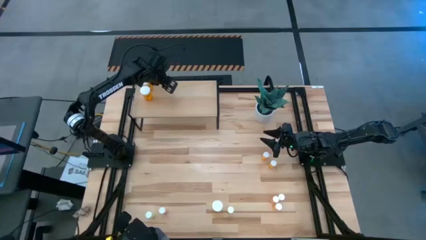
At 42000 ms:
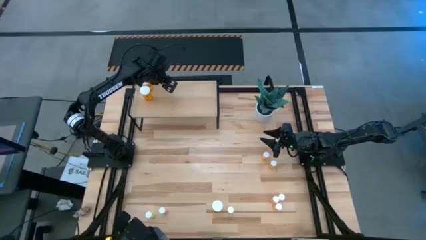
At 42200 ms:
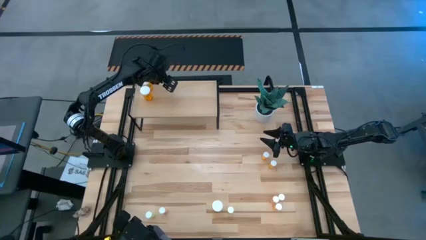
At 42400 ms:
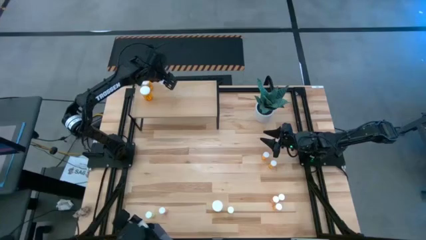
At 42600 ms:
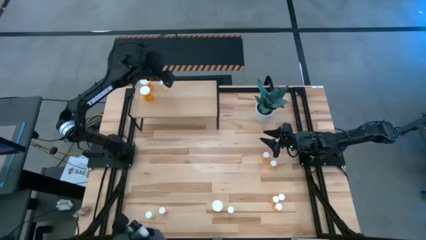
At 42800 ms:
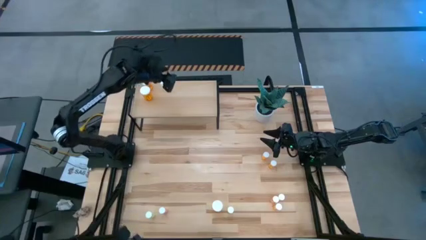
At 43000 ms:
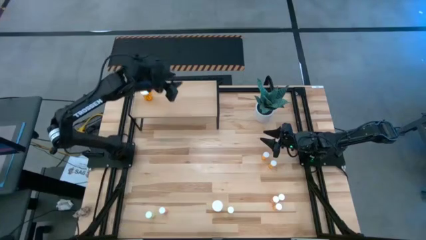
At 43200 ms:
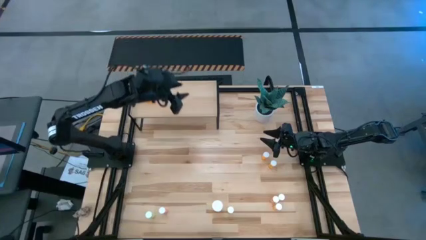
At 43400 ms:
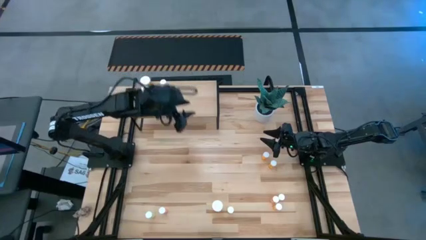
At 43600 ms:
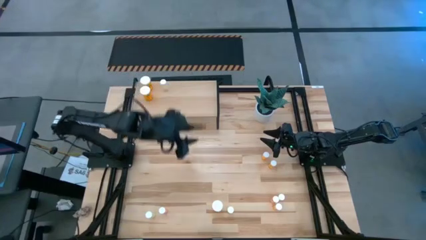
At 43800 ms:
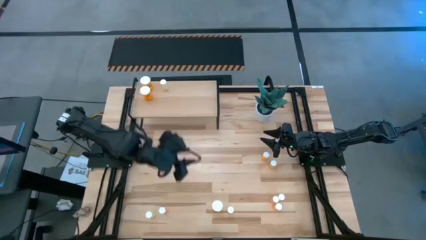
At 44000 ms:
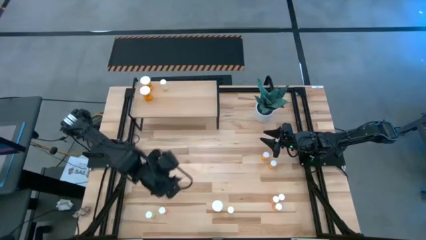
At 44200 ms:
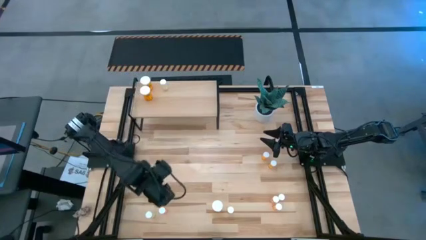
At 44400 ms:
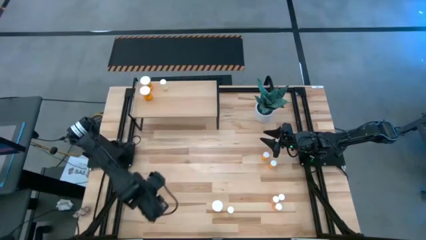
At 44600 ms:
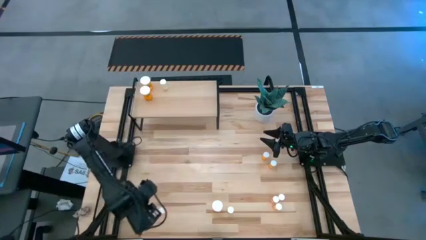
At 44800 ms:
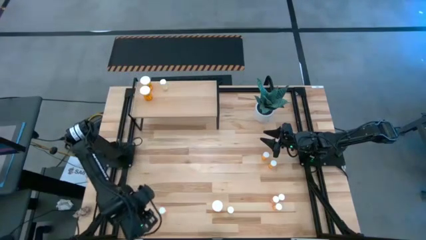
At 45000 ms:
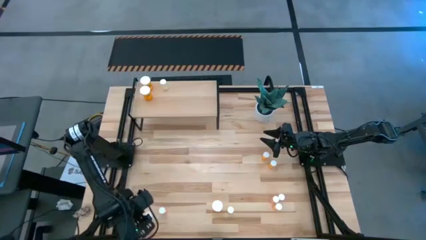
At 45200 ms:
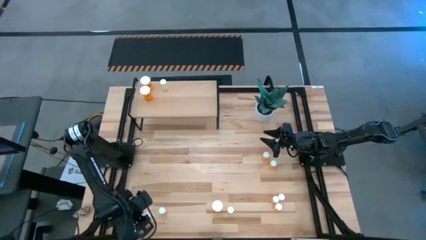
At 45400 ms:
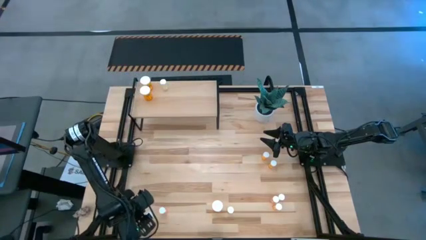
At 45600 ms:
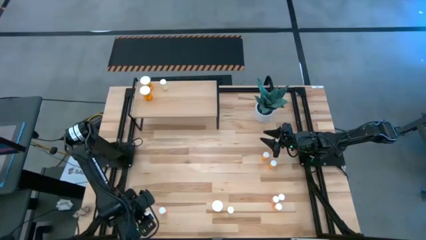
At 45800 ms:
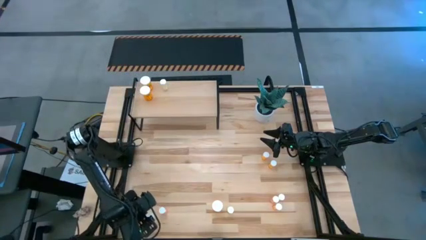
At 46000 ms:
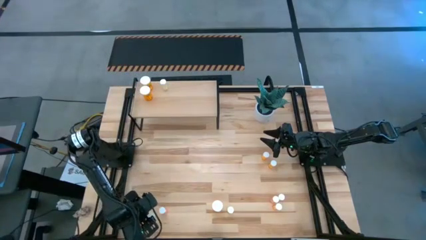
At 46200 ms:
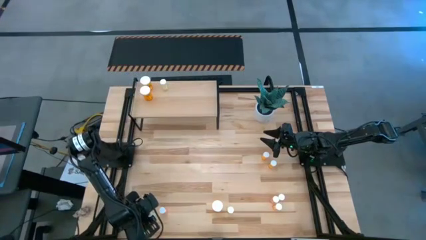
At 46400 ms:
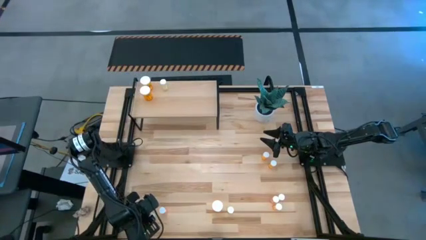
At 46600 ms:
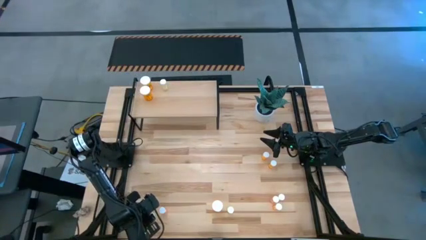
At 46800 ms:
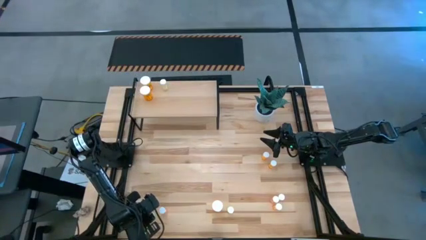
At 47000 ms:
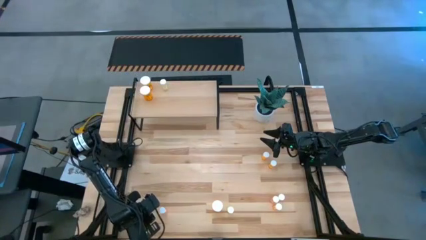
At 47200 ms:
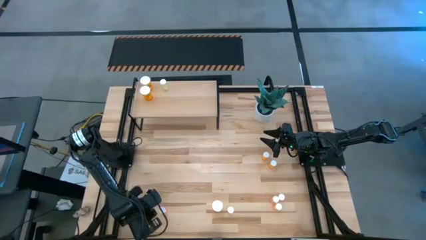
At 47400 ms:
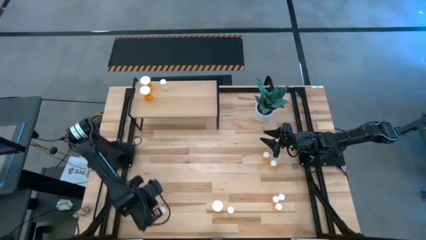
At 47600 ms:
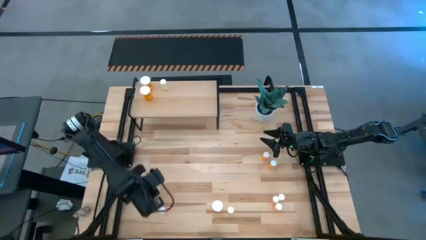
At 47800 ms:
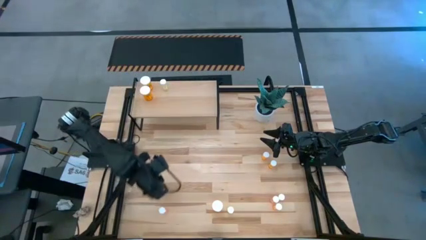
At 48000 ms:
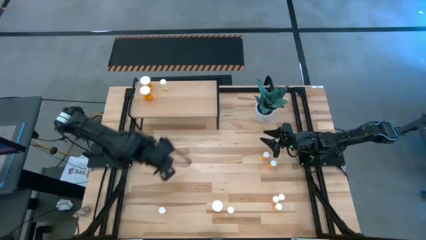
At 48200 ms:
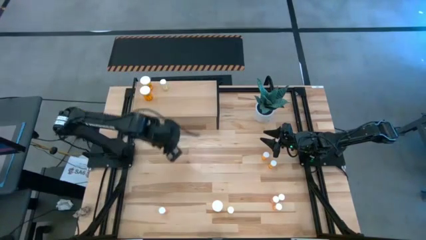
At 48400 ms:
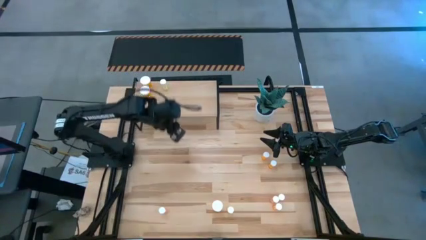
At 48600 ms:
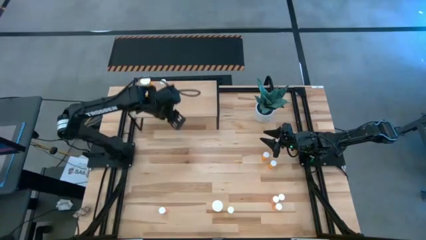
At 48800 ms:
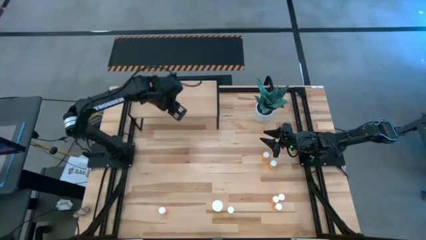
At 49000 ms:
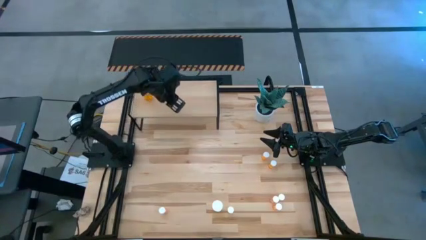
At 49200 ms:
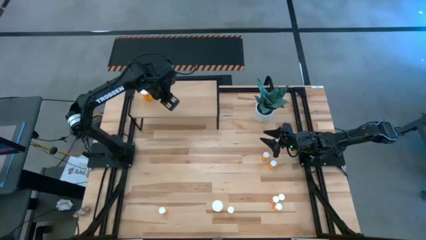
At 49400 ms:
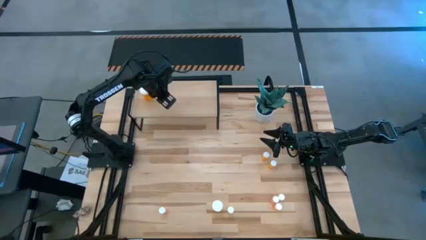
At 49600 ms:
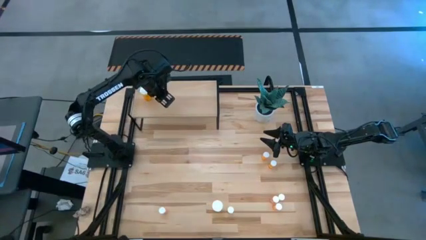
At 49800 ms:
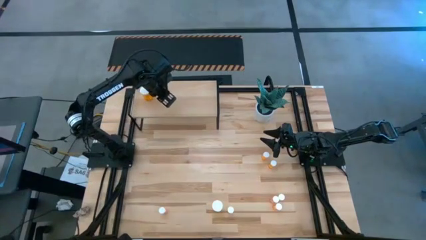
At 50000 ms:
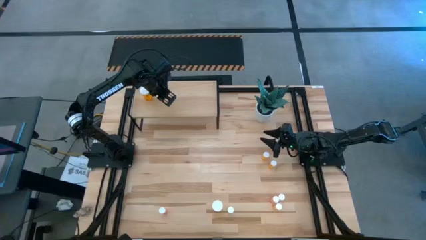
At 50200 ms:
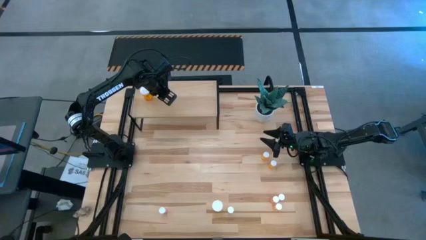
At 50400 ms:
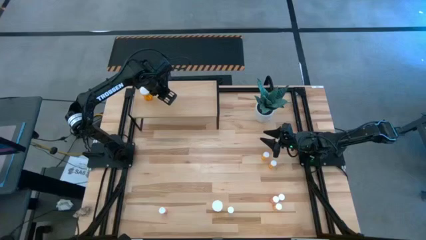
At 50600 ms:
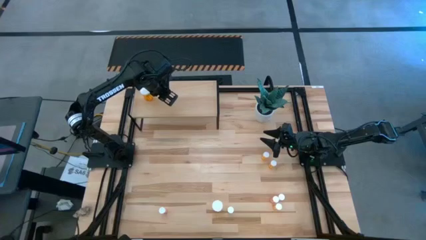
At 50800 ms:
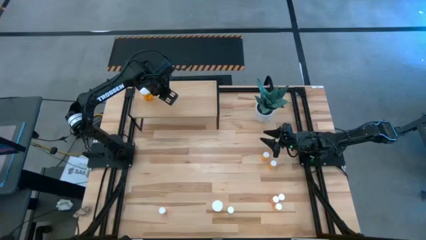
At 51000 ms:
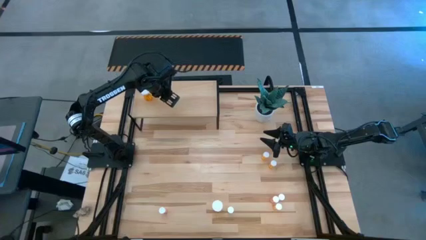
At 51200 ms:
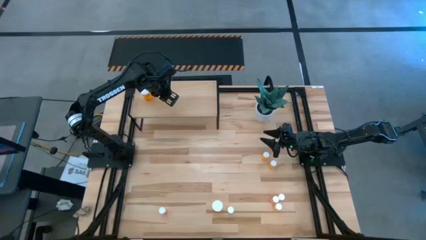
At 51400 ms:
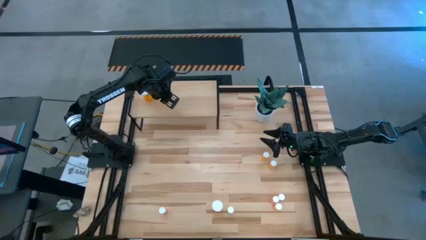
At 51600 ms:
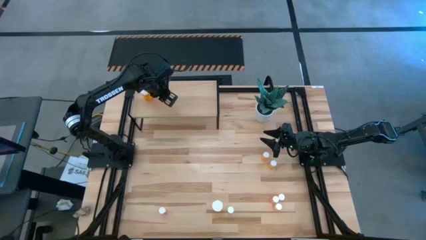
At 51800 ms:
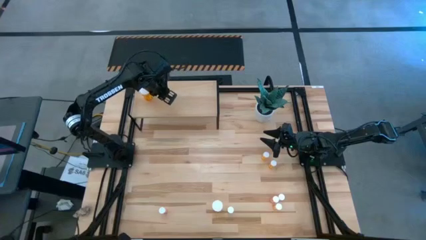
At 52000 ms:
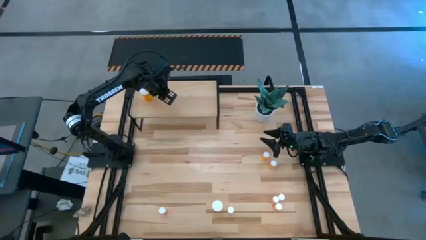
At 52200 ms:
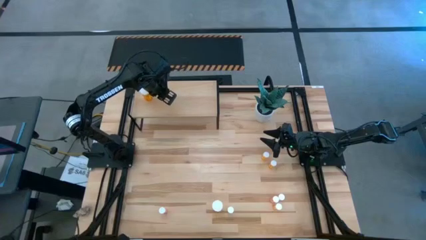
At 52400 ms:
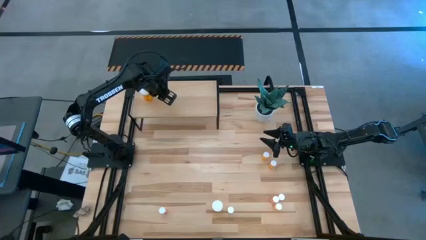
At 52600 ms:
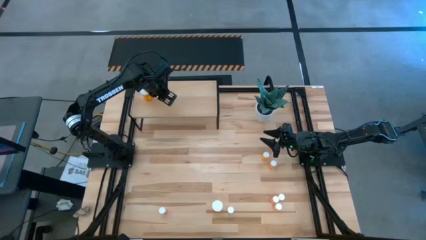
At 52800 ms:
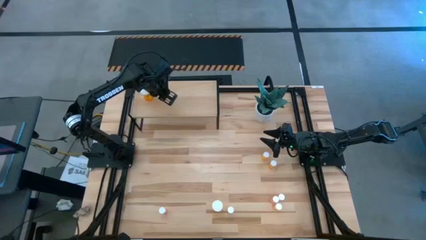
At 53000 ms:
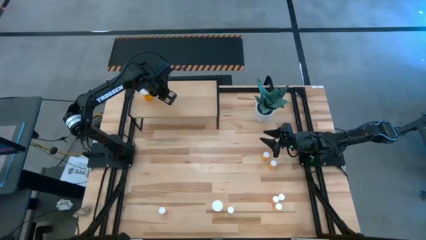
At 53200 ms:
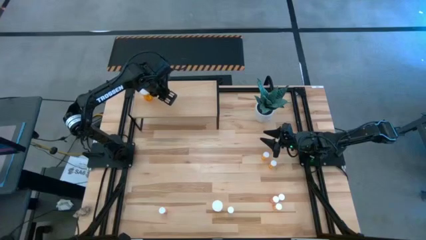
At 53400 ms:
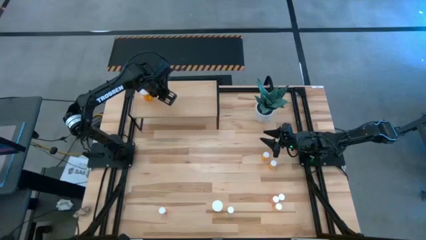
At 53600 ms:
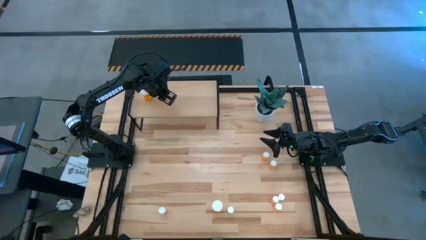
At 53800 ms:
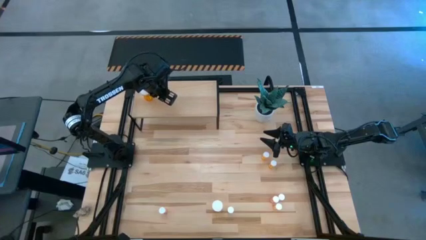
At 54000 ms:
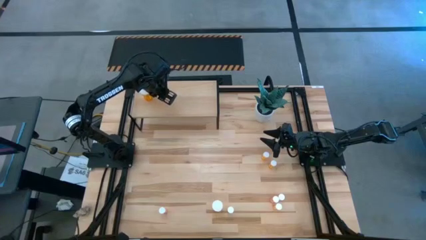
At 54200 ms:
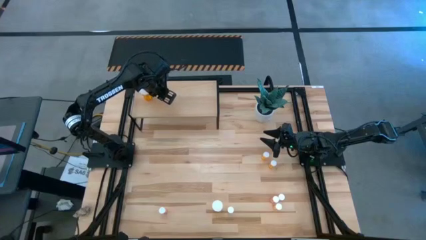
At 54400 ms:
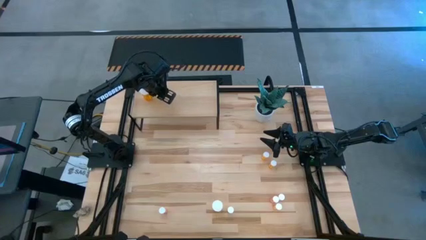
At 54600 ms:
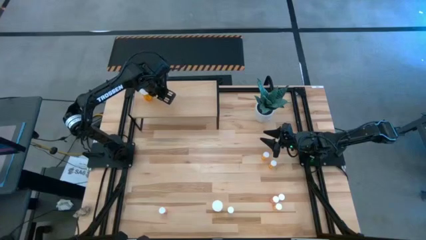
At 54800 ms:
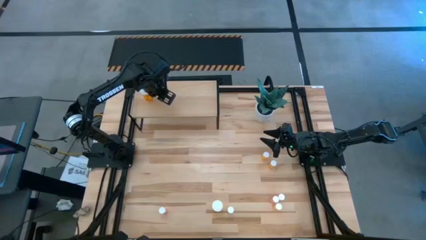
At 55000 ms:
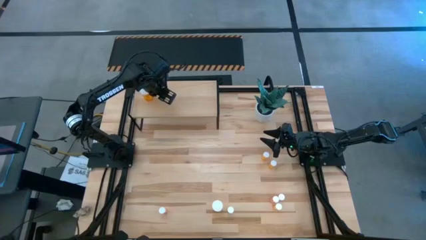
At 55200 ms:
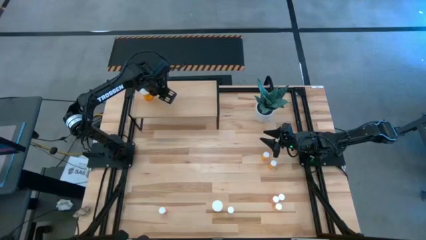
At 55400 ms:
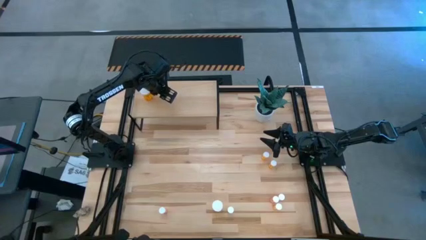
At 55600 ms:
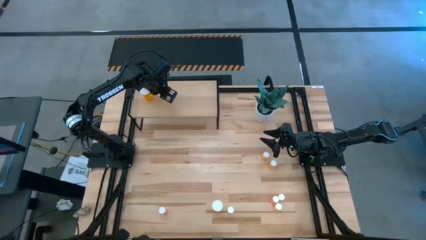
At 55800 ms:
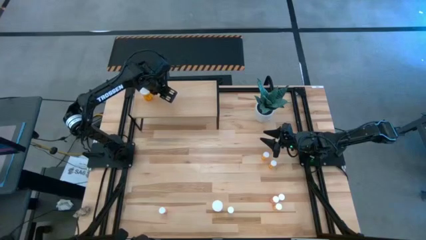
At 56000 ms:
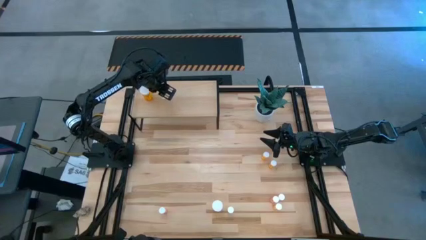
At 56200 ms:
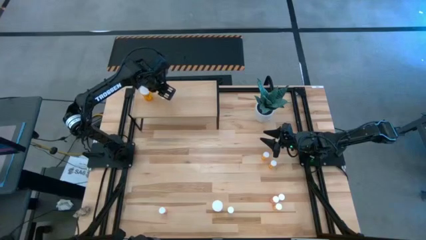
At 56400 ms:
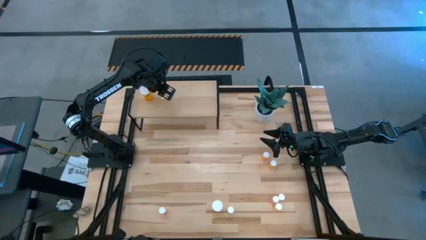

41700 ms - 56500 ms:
Task: Pick and place medicine bottles onto shelf by color
Put the left yellow pill bottle on the shelf aligned with the other yellow pill bottle
